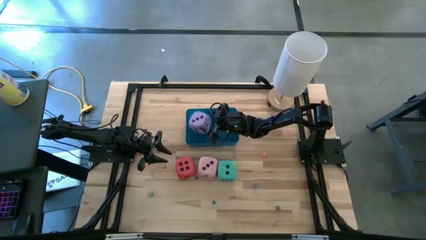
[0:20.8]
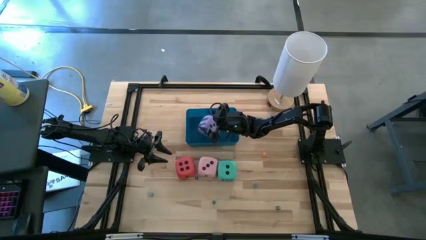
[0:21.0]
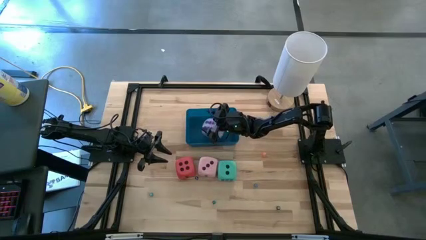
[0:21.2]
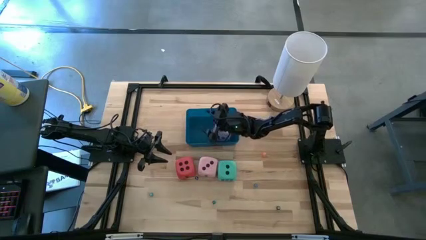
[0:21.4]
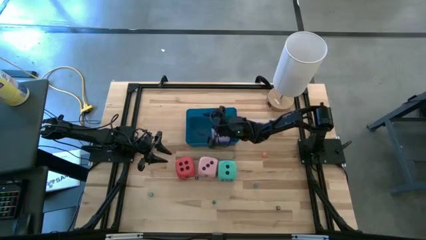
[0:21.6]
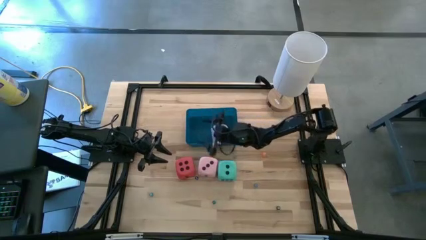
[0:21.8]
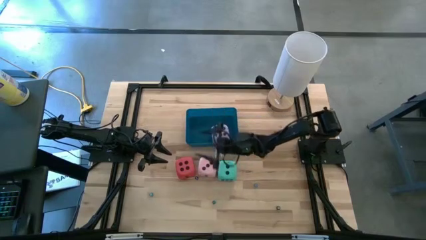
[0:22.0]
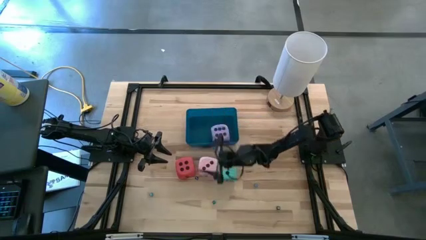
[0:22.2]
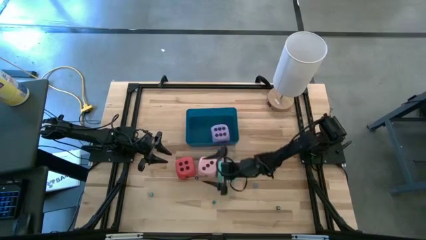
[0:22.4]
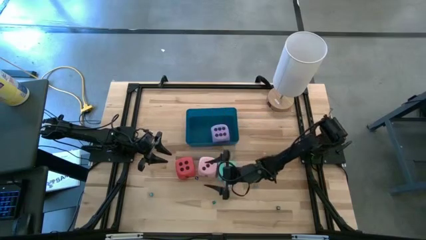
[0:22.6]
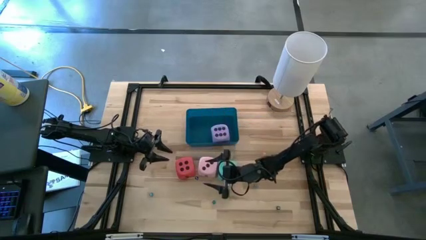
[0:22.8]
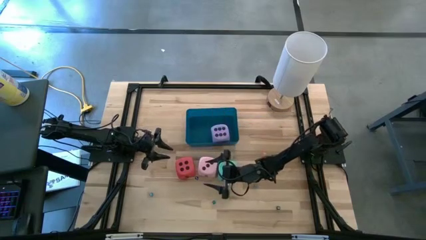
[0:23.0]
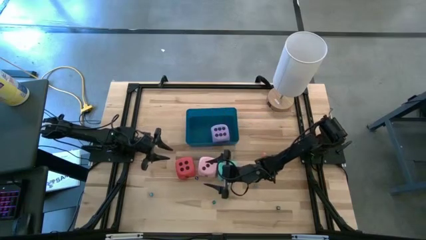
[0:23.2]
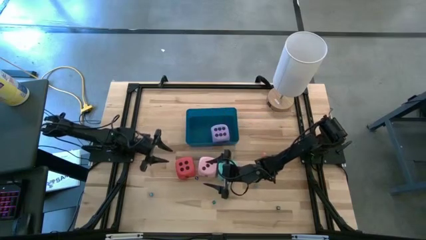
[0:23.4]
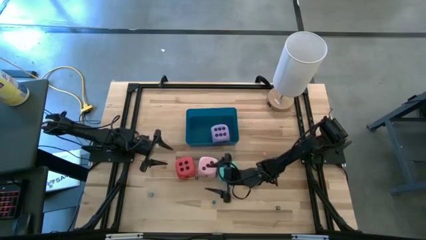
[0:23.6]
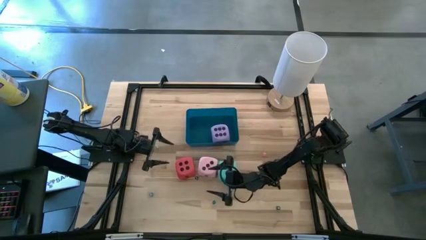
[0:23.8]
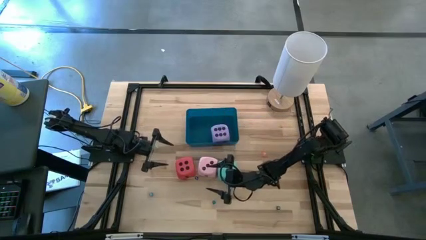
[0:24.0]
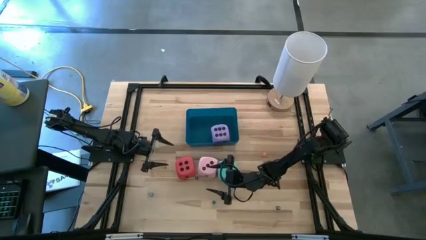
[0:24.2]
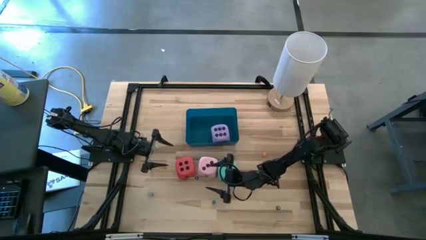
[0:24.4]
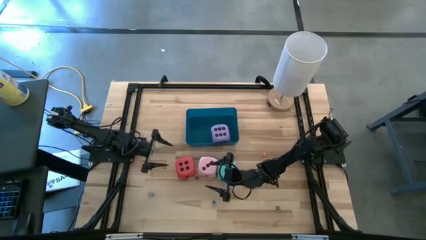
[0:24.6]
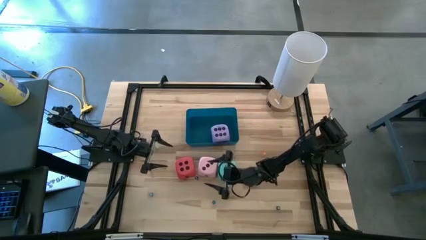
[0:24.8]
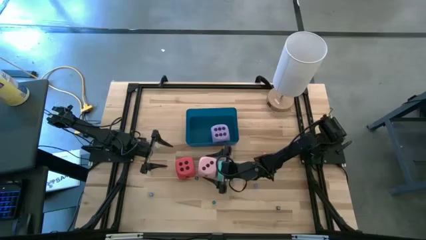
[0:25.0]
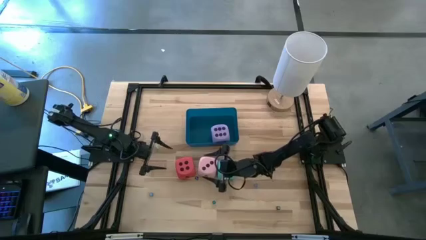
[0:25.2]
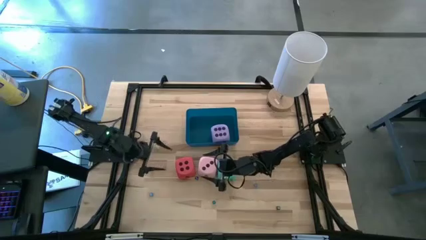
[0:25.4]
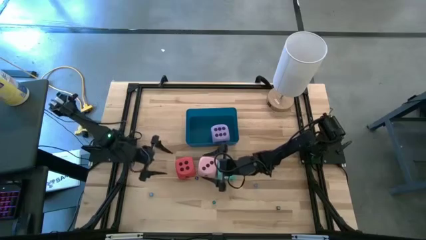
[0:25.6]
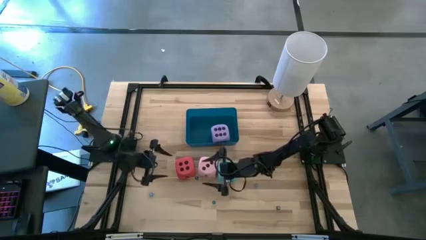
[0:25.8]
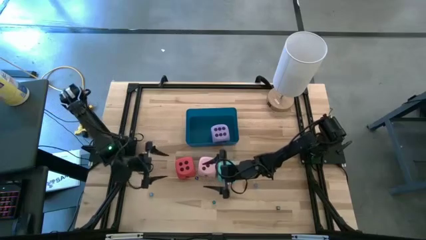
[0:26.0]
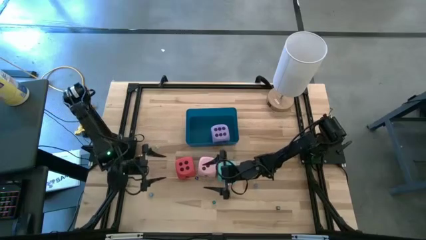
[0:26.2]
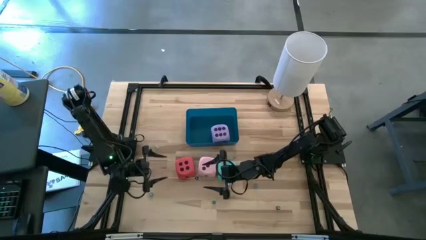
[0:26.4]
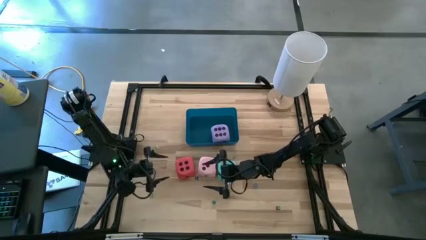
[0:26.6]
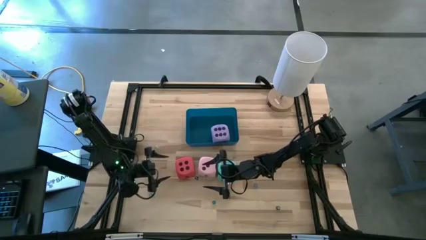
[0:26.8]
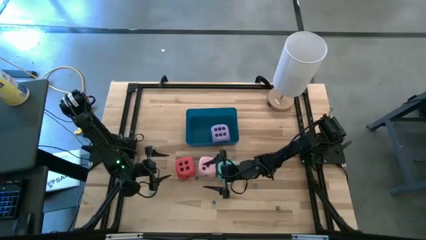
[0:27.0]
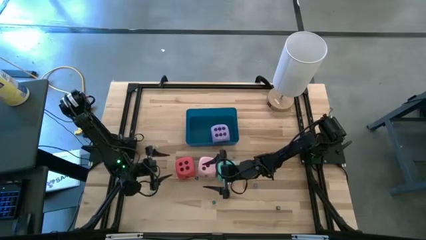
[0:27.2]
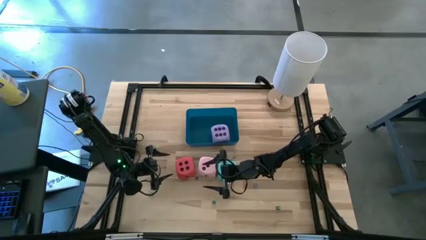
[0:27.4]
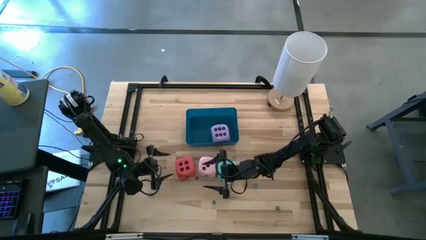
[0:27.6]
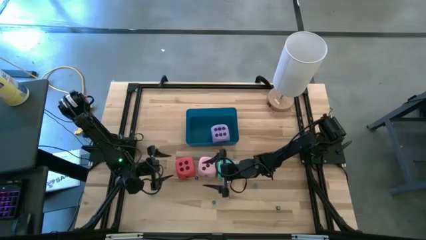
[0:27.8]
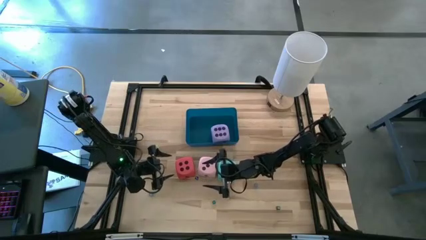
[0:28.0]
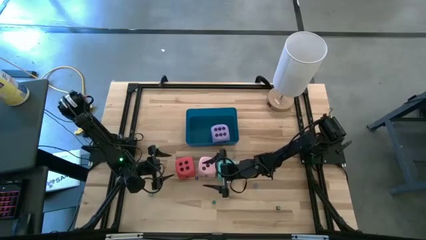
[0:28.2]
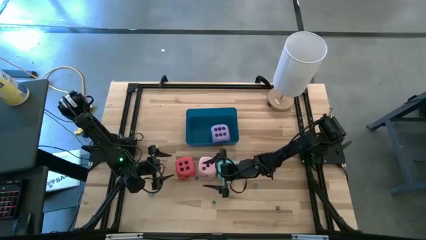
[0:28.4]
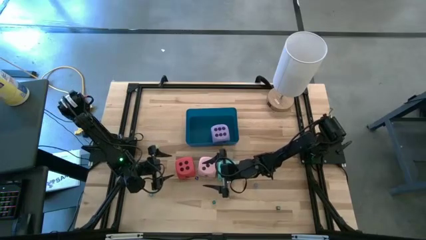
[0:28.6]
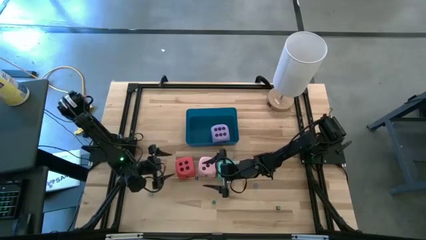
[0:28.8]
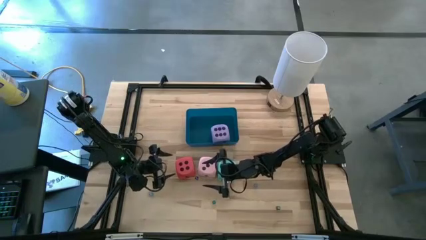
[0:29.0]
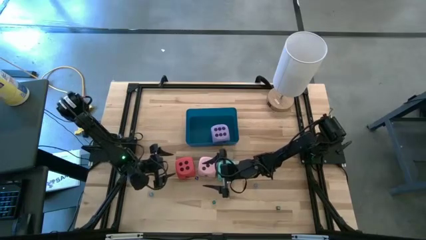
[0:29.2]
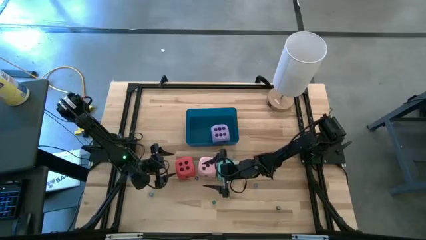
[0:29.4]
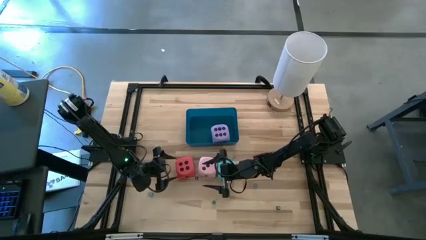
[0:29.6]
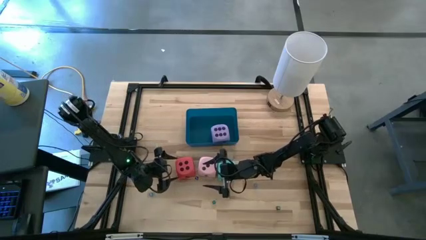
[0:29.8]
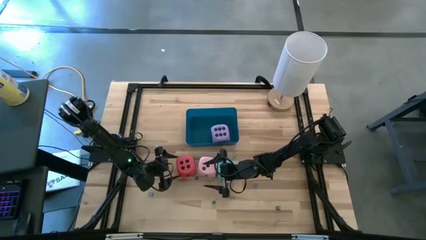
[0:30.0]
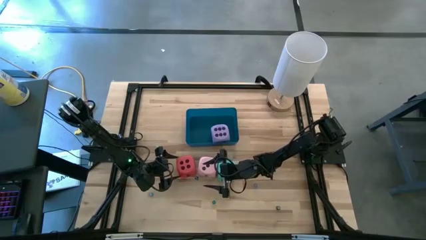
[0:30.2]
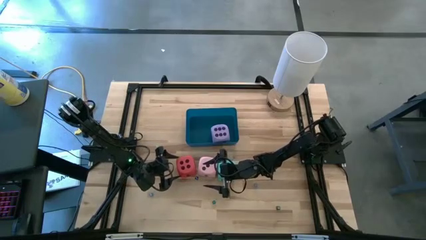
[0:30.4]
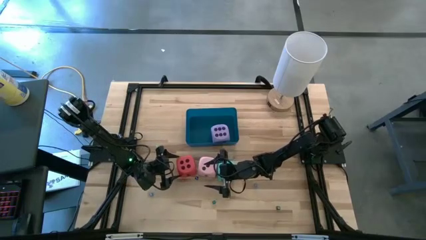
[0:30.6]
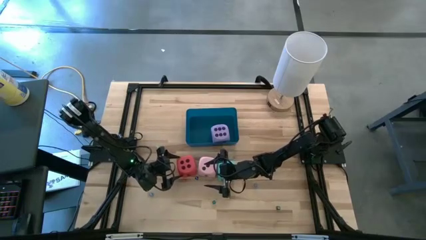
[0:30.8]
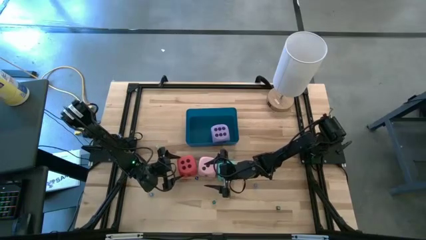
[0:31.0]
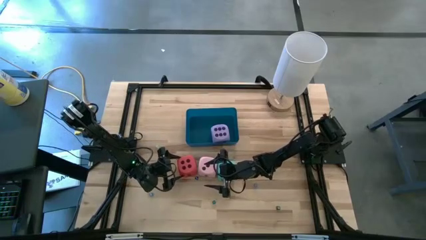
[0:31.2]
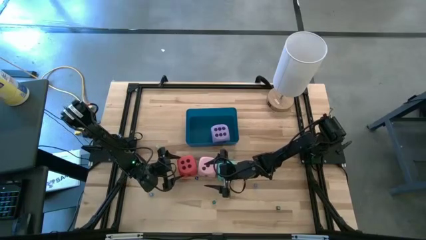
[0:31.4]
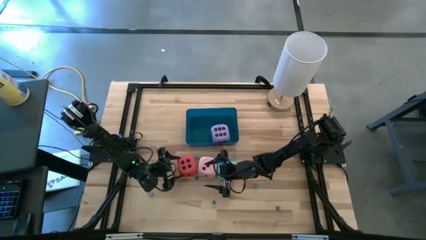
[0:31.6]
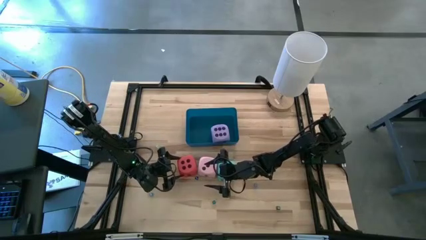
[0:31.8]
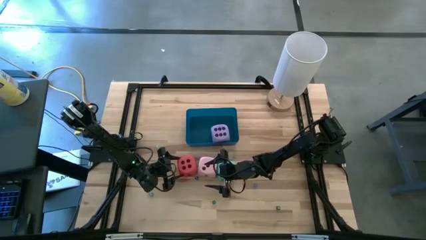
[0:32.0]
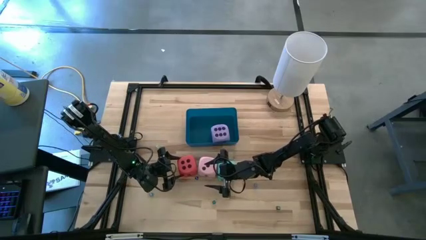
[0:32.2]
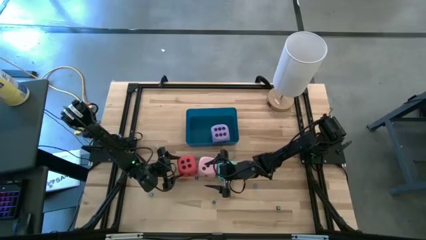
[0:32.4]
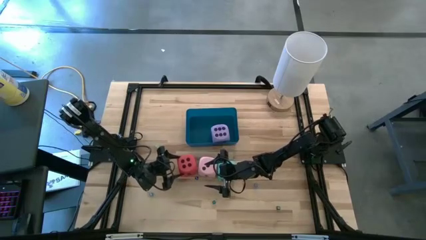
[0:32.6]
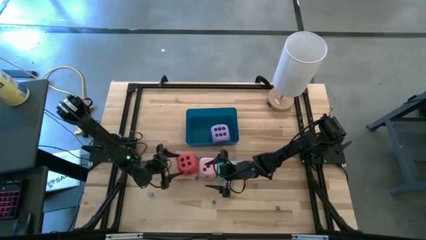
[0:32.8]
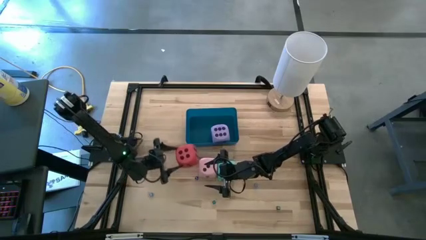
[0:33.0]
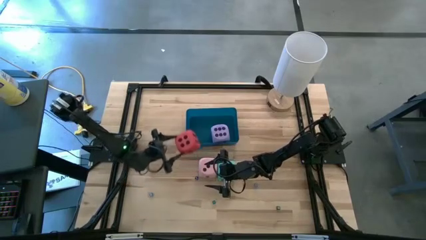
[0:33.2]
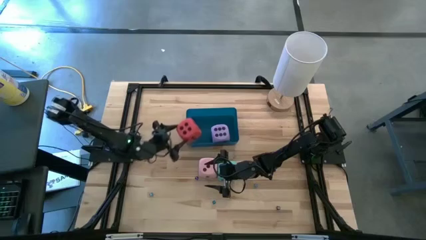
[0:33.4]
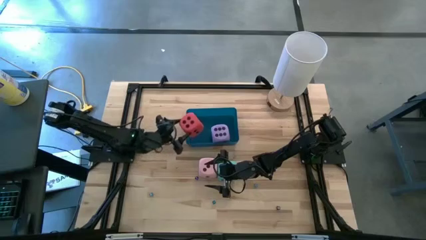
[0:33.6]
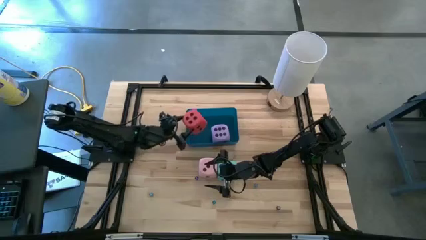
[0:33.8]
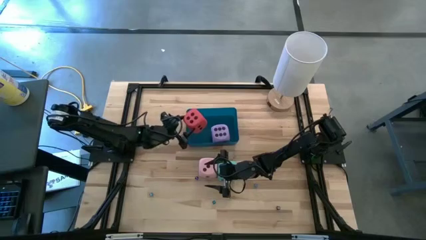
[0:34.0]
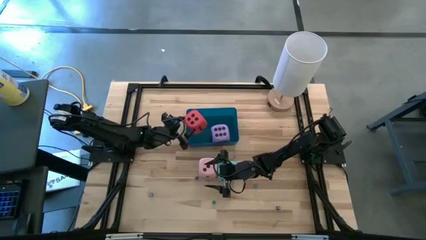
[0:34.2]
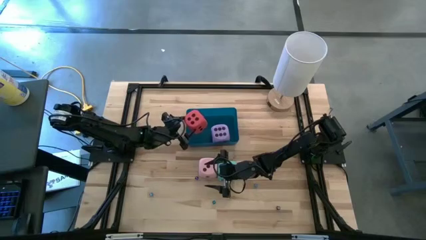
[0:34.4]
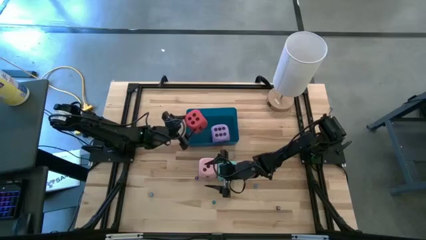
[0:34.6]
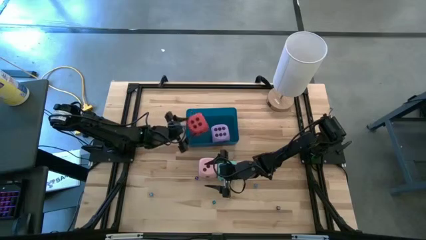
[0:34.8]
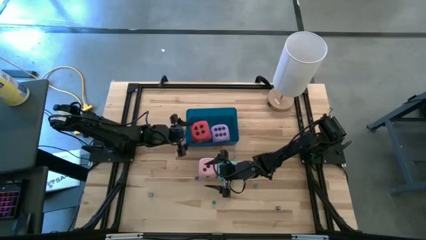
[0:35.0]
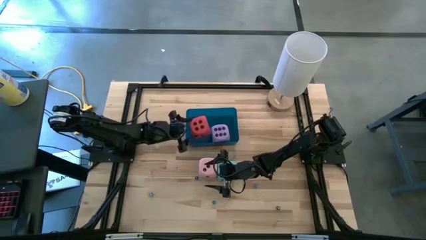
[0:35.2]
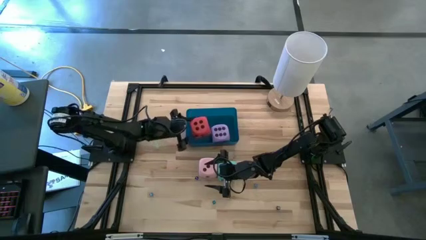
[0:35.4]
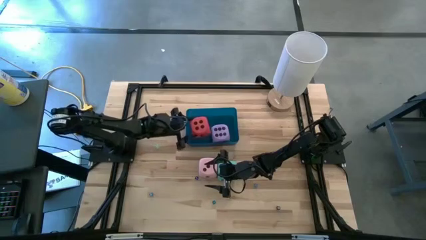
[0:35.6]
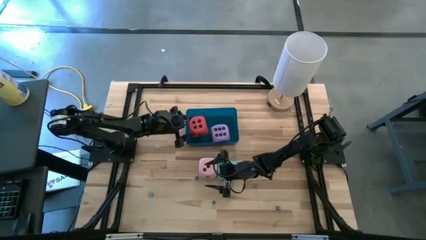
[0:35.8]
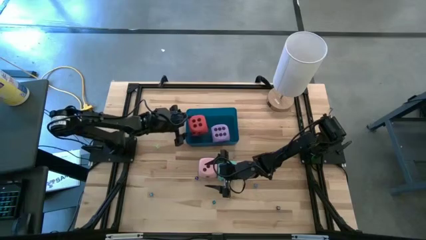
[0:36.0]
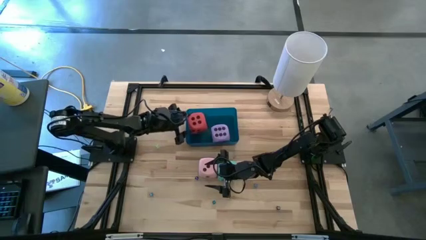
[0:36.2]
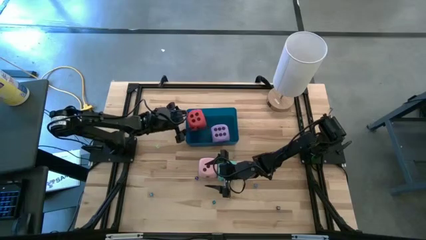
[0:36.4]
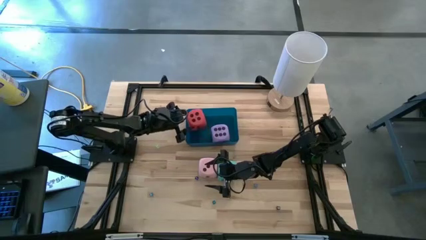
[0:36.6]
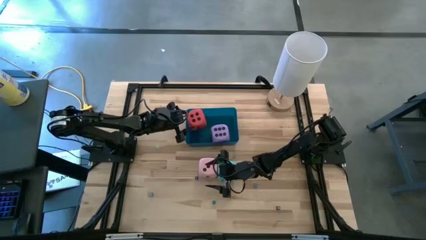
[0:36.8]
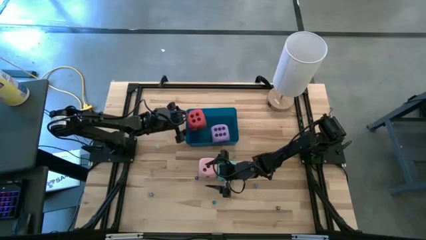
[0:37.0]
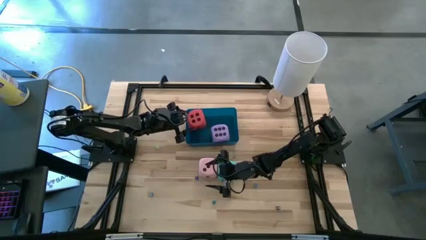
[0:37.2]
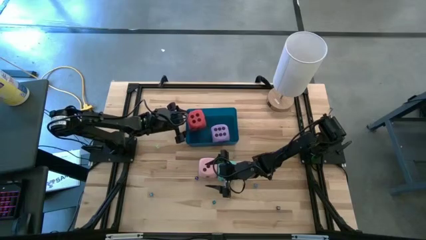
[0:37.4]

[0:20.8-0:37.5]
Task: Pick & Place Dice
Put the orange die into the blue bin
